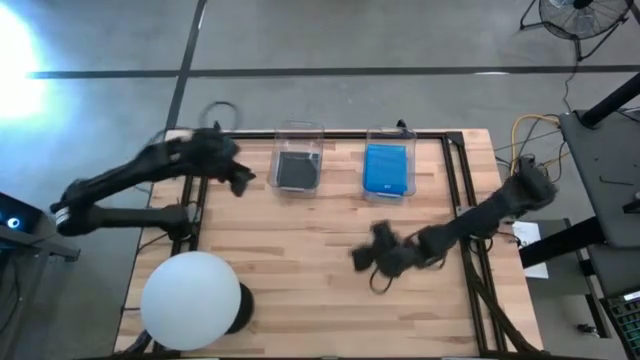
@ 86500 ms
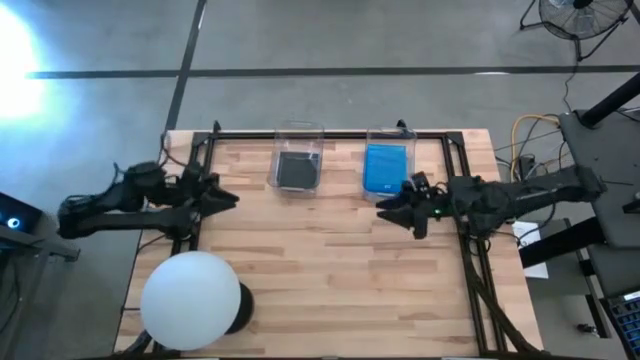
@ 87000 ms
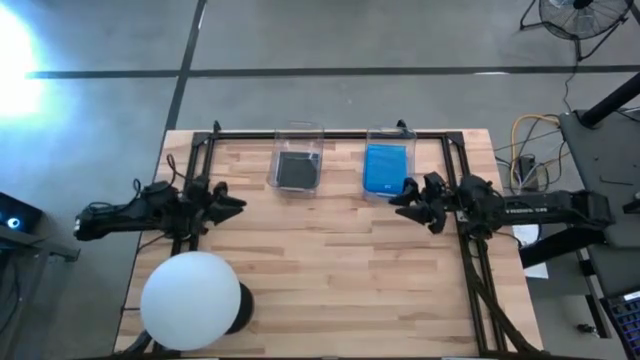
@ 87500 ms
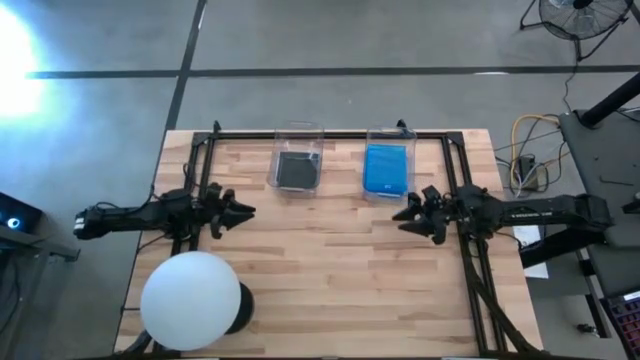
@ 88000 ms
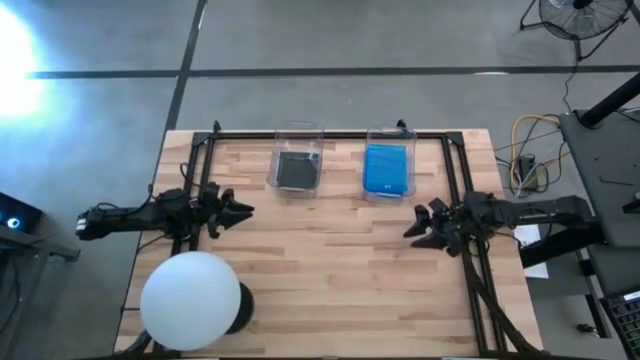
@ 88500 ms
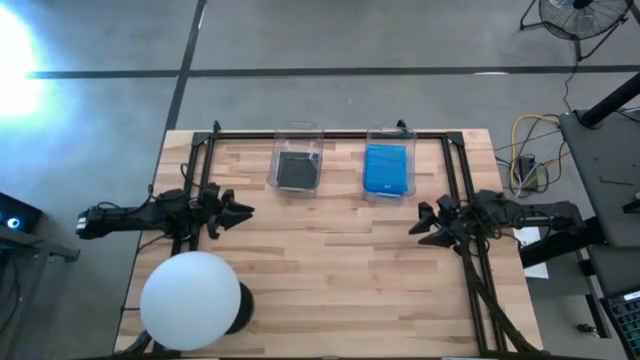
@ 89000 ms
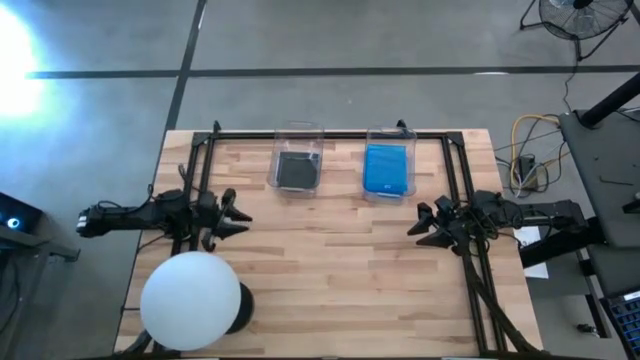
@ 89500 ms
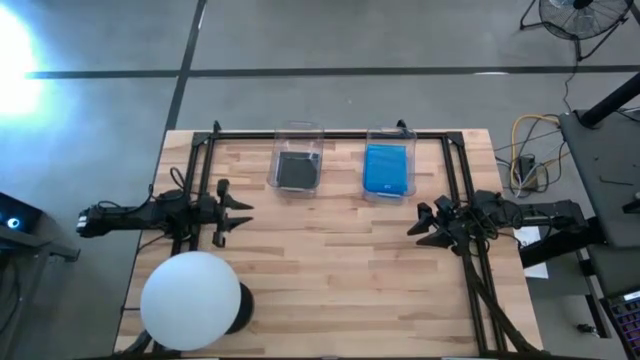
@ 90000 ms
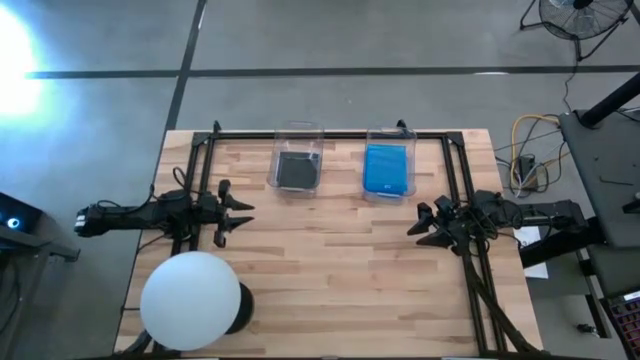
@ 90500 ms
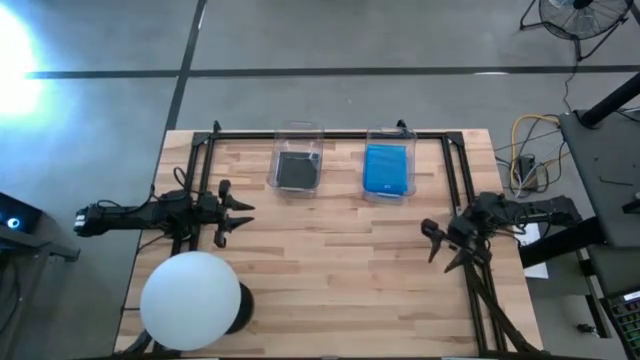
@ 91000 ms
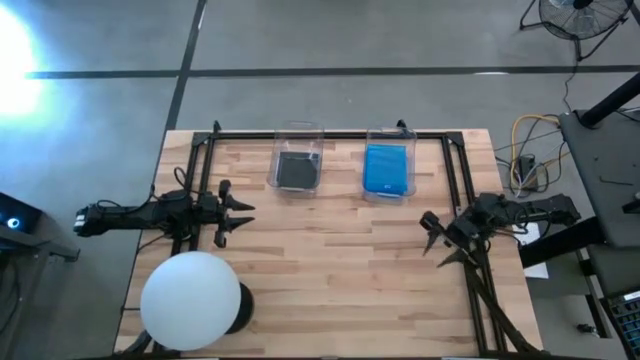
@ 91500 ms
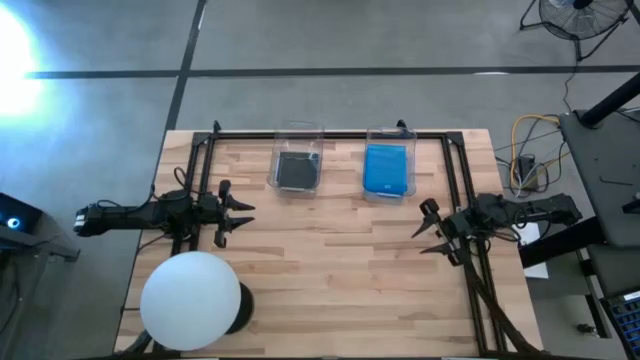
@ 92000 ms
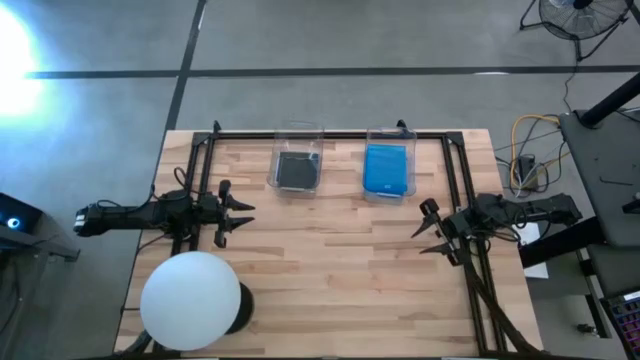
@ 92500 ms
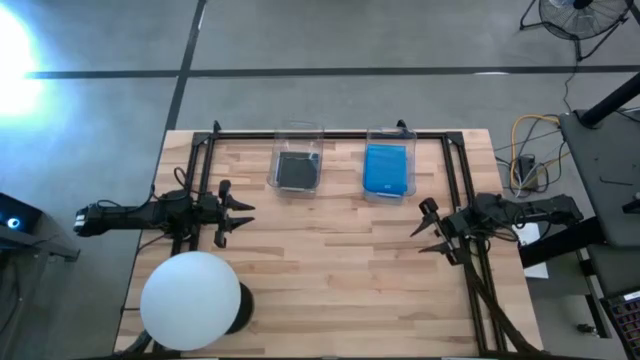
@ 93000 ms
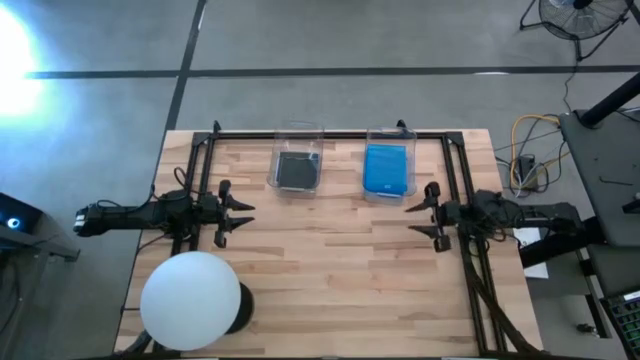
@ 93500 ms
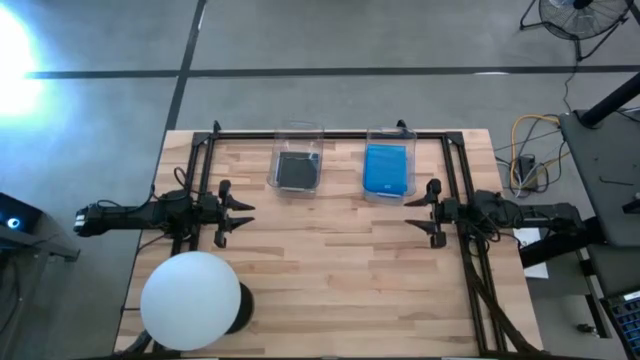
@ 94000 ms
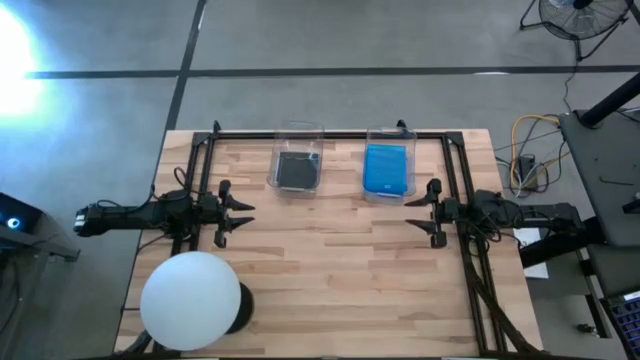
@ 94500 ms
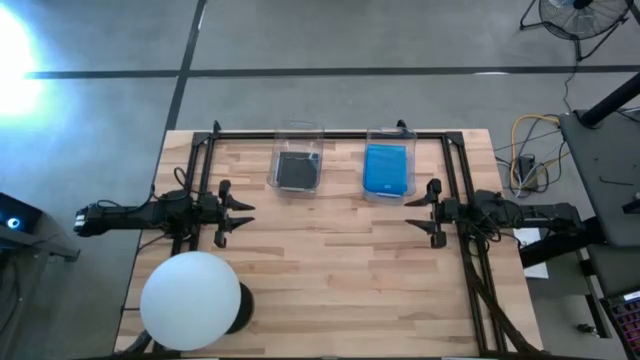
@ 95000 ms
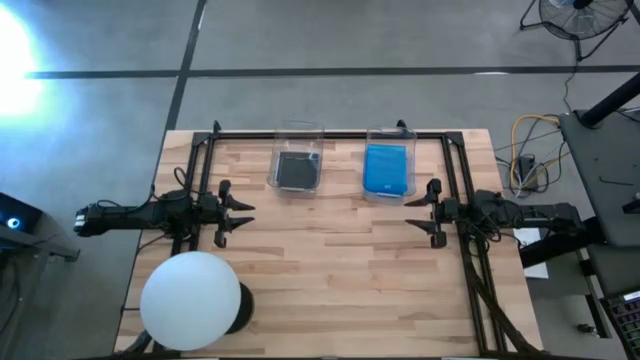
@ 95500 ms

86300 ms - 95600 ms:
Task: Pick & place jewel cases by type
Return to Home Position

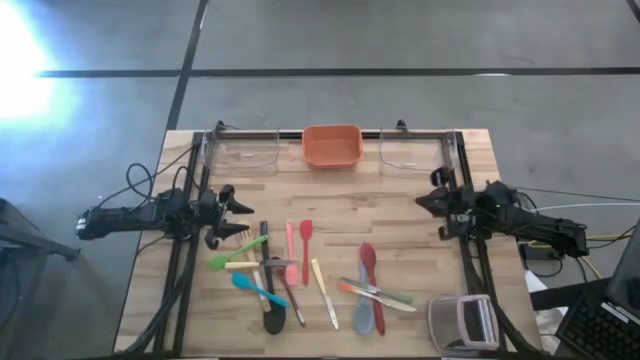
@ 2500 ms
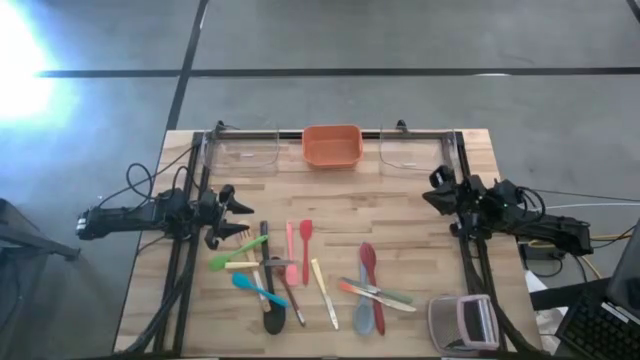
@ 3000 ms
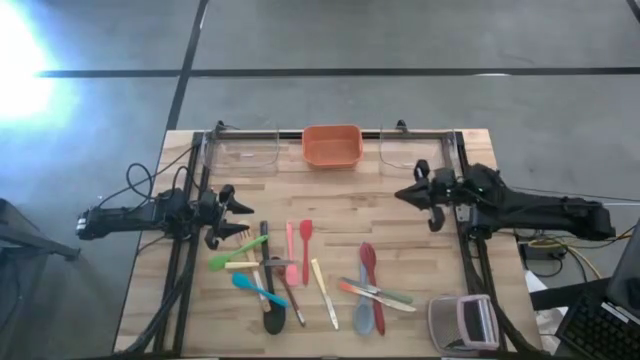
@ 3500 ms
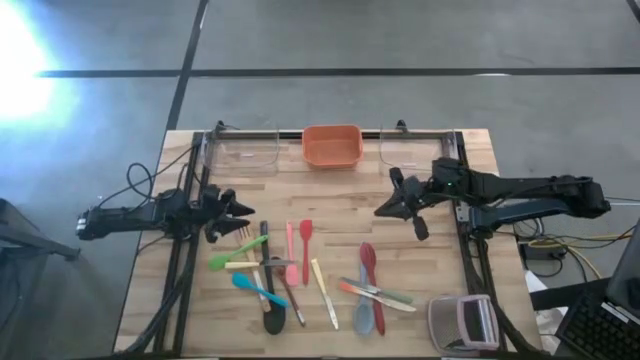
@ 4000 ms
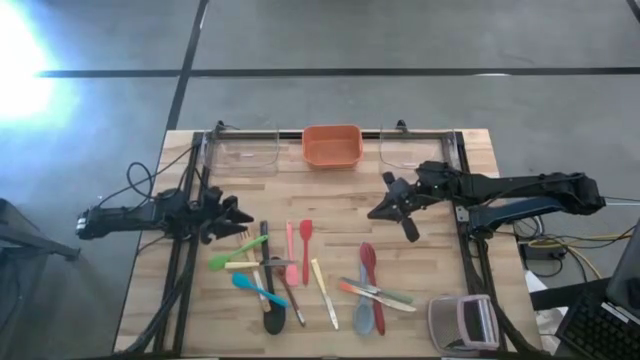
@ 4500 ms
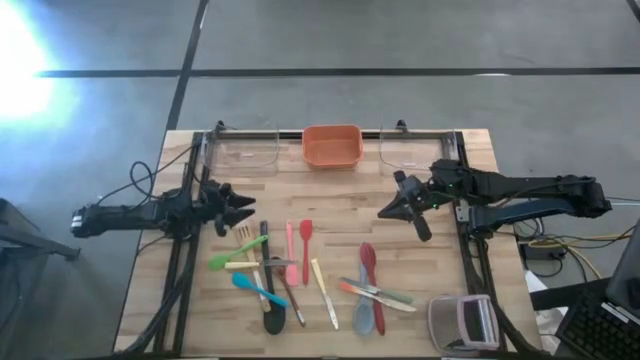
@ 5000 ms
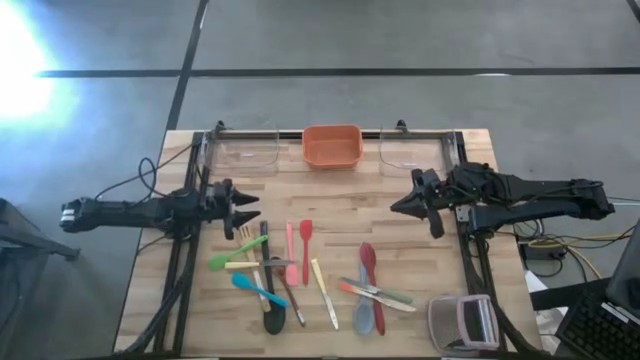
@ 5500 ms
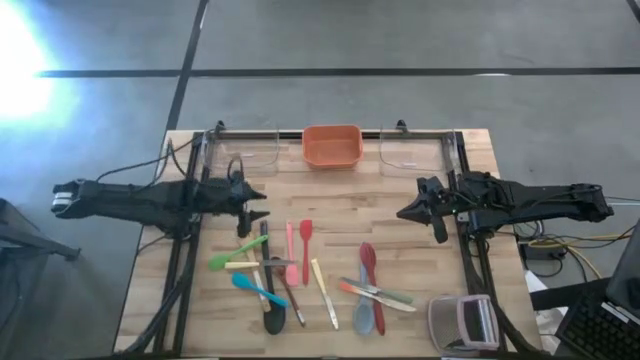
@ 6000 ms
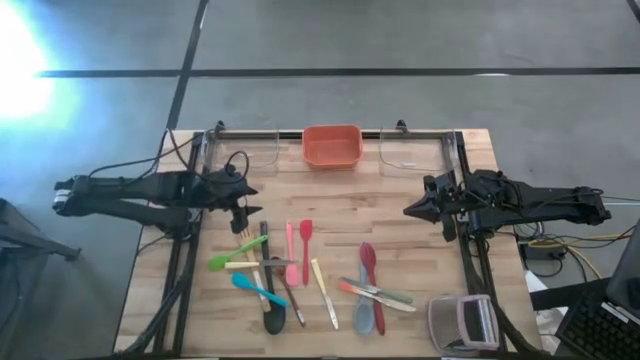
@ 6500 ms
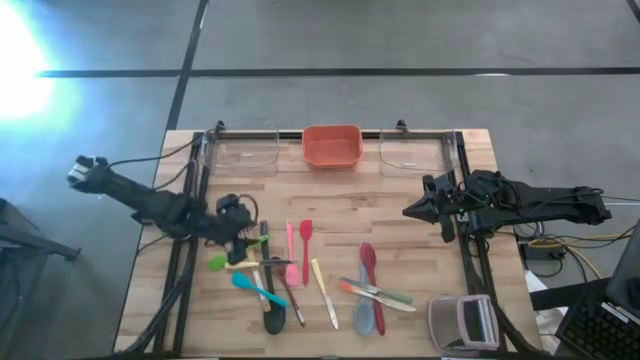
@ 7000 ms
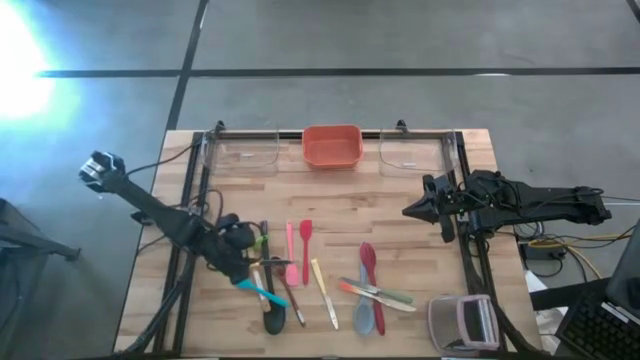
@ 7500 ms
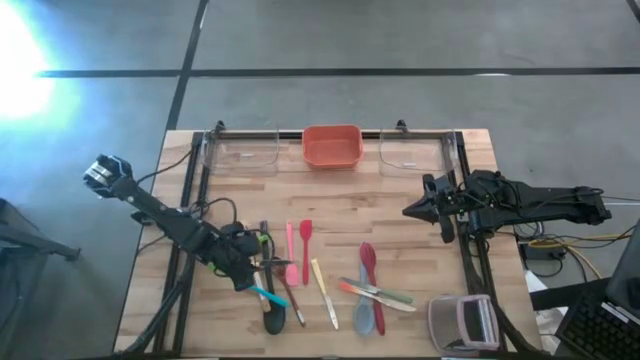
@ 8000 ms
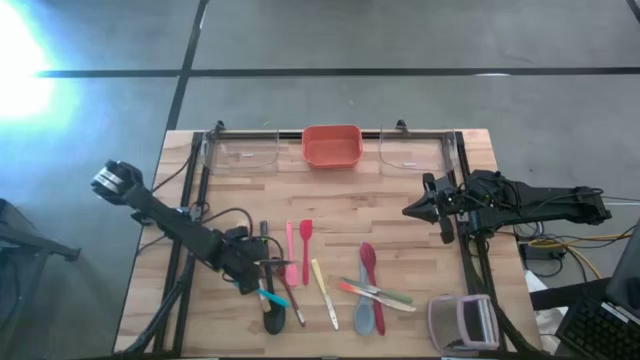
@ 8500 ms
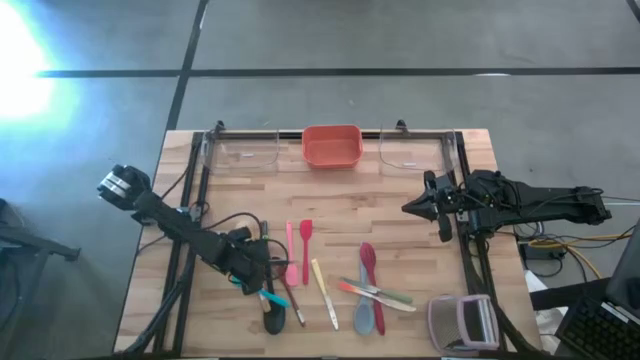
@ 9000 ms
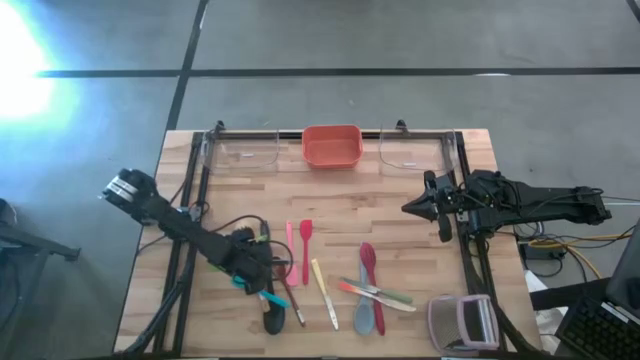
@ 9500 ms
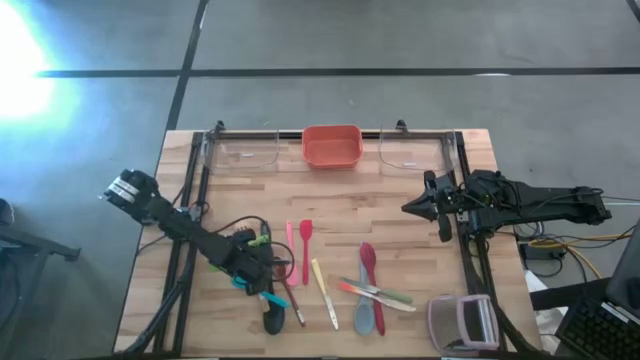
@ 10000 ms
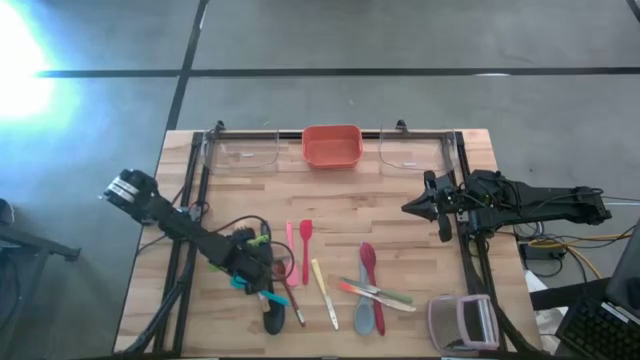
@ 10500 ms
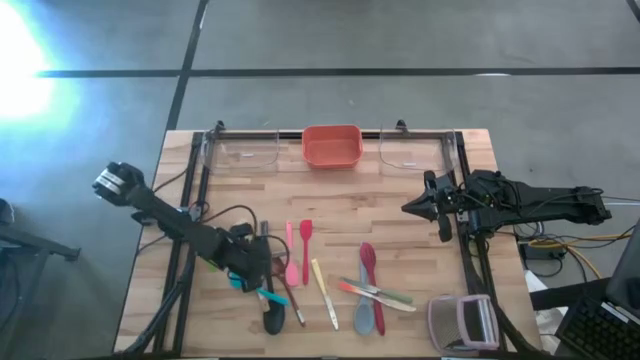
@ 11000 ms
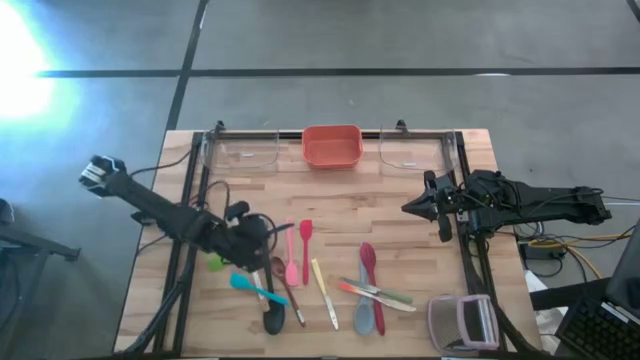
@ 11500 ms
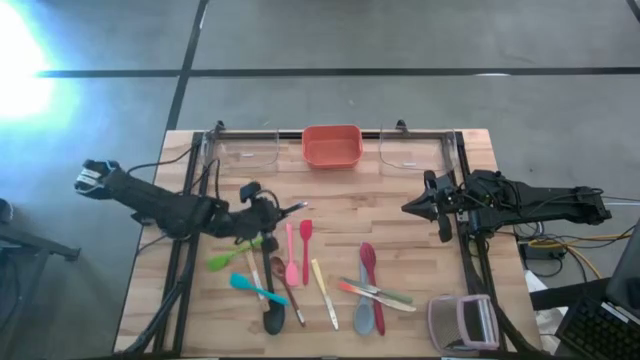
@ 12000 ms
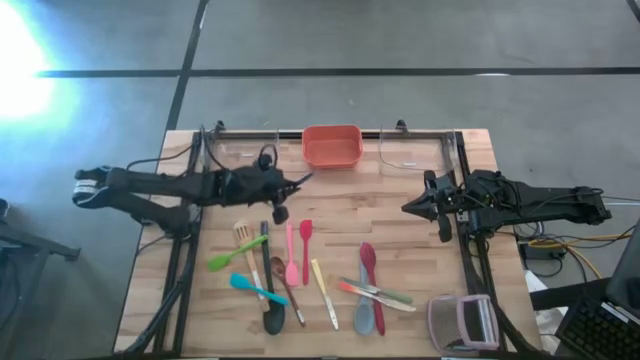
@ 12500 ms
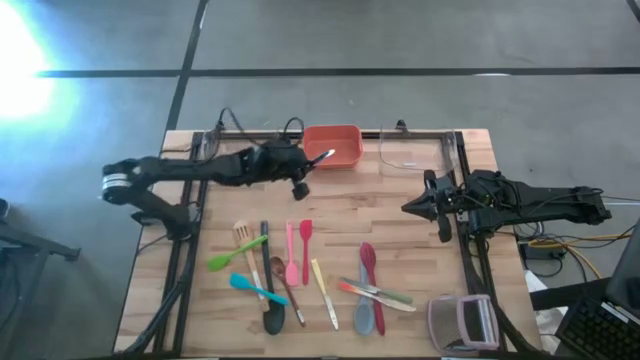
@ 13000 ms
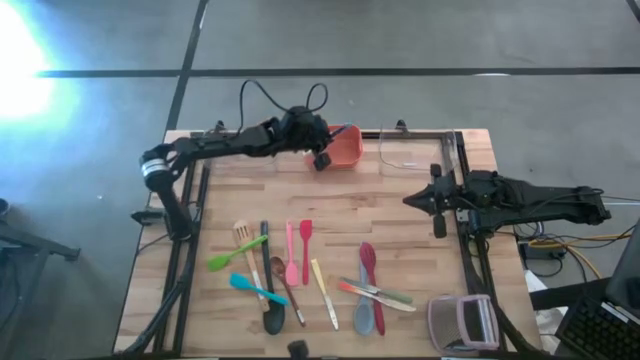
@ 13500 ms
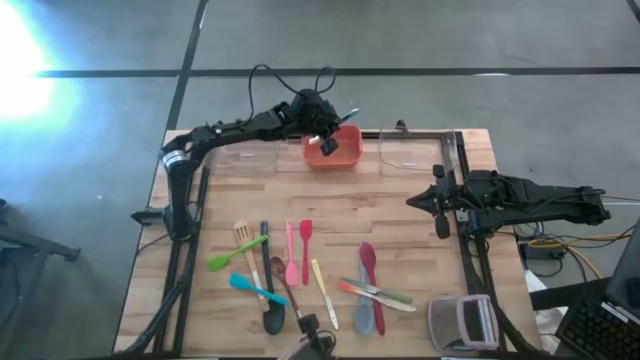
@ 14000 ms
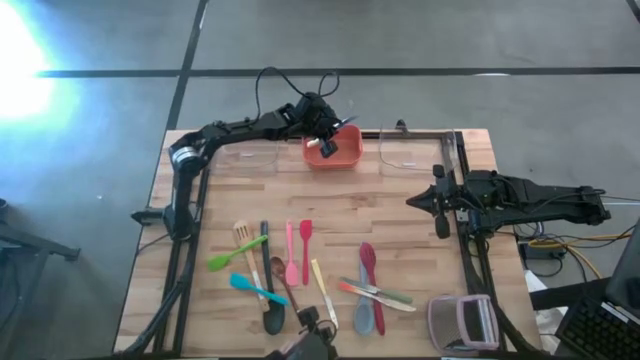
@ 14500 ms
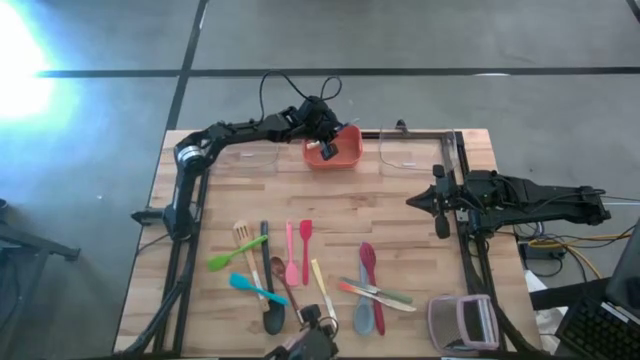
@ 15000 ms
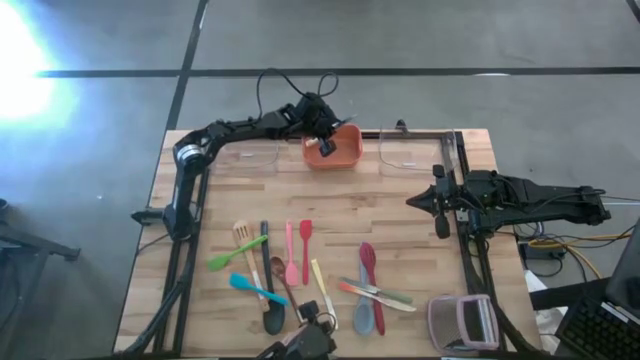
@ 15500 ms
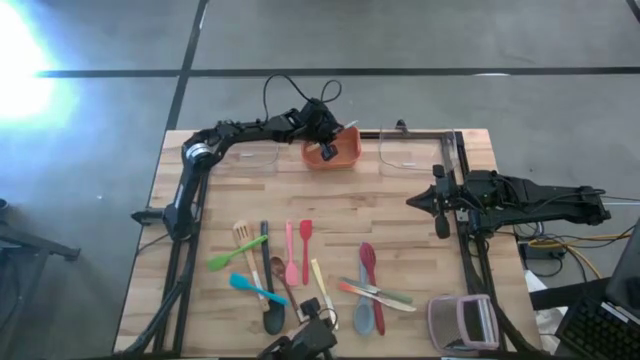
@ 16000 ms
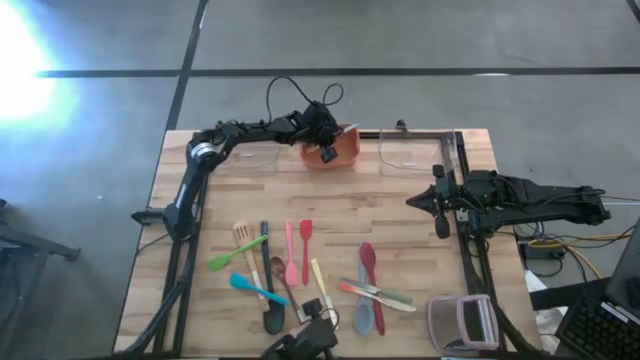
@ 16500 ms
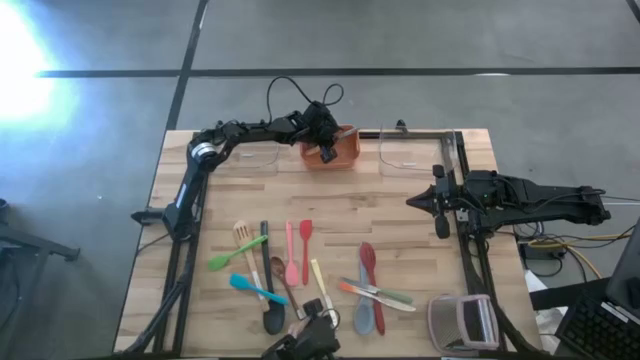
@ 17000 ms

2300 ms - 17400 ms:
Task: Pick & Place Kitchen Items
Put the left yellow knife into the orange bin
